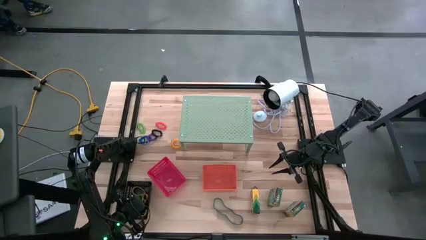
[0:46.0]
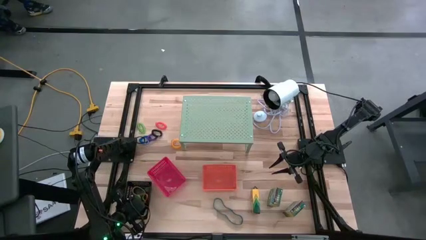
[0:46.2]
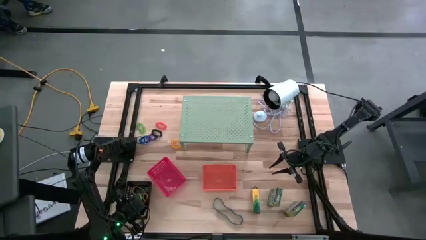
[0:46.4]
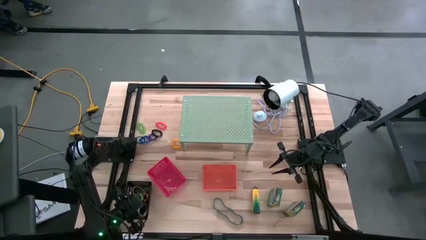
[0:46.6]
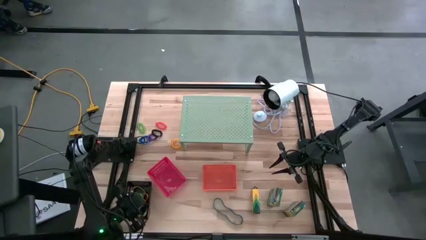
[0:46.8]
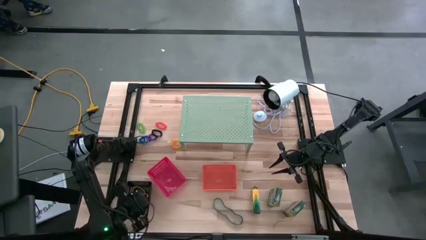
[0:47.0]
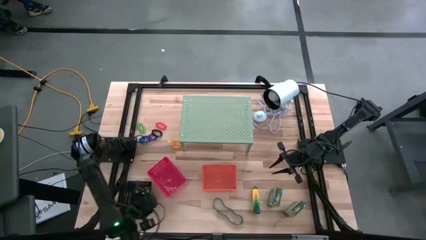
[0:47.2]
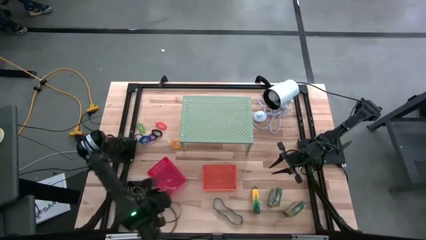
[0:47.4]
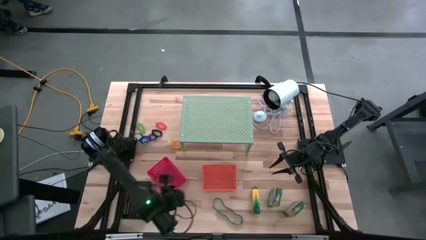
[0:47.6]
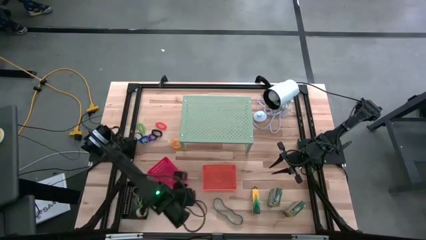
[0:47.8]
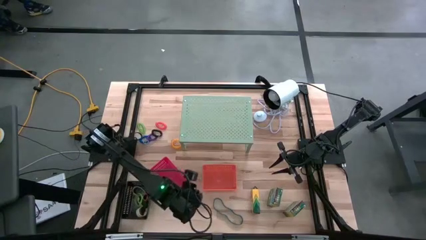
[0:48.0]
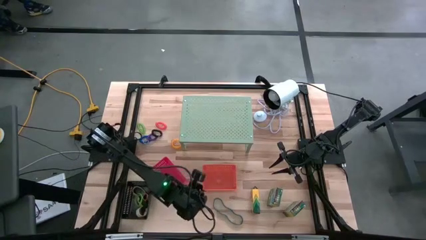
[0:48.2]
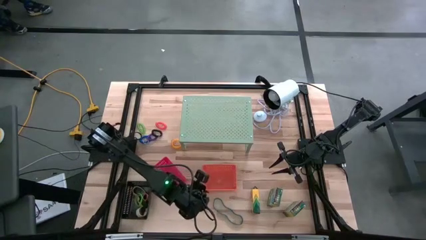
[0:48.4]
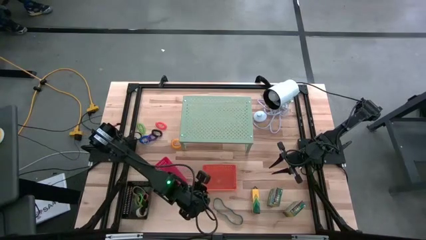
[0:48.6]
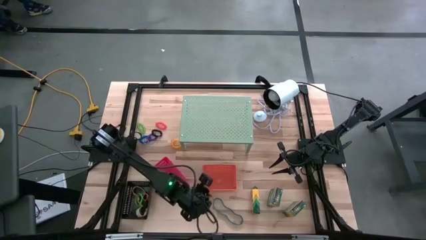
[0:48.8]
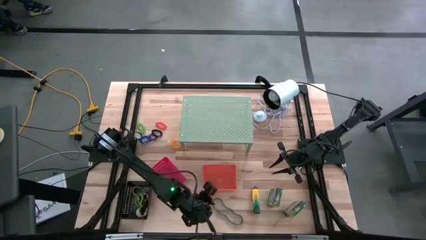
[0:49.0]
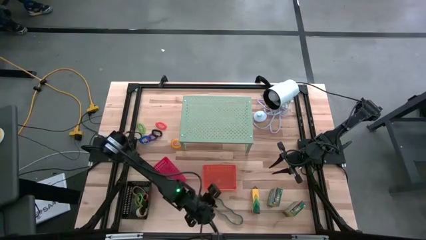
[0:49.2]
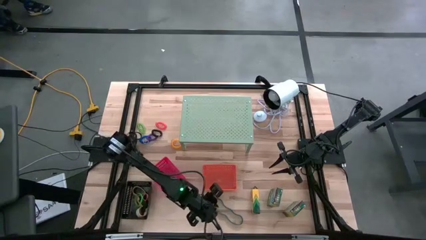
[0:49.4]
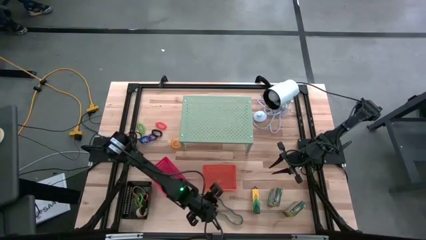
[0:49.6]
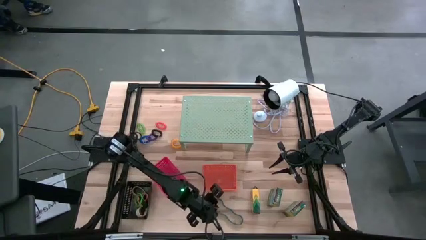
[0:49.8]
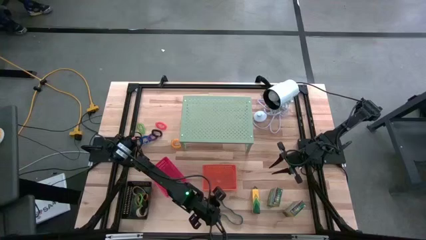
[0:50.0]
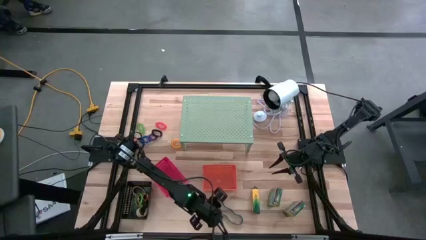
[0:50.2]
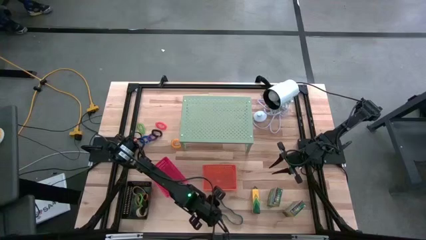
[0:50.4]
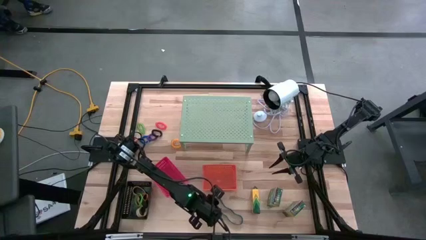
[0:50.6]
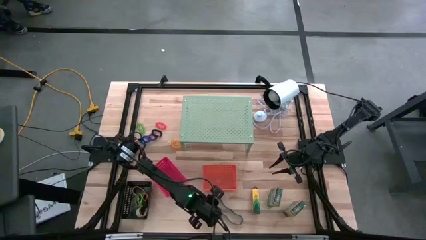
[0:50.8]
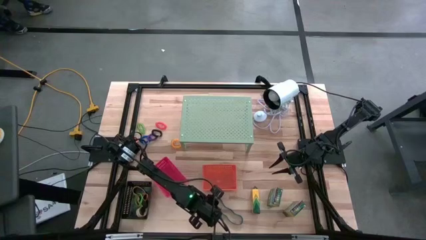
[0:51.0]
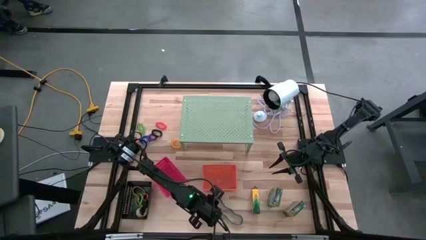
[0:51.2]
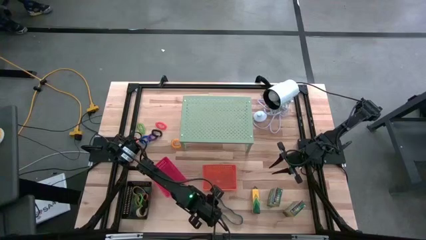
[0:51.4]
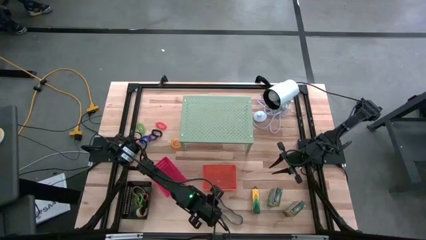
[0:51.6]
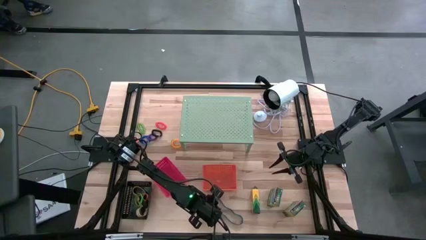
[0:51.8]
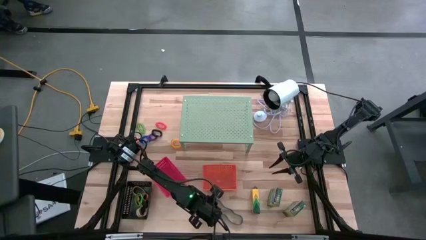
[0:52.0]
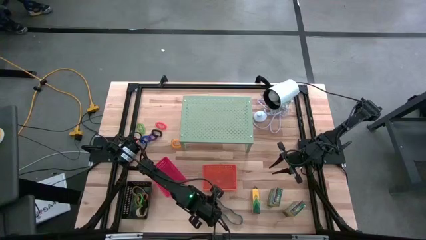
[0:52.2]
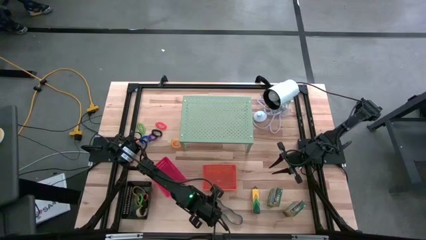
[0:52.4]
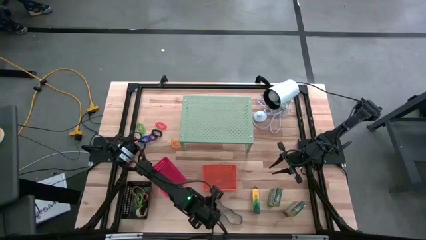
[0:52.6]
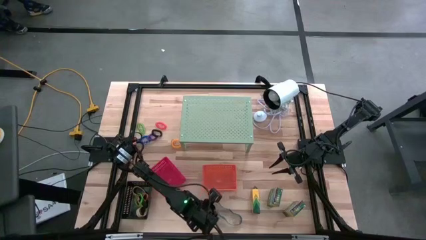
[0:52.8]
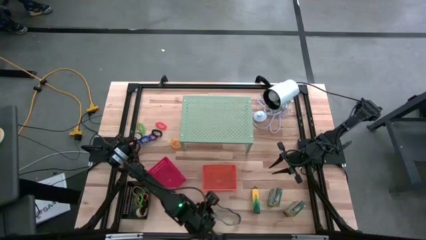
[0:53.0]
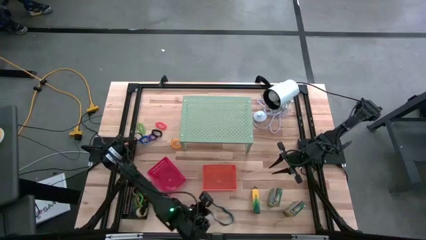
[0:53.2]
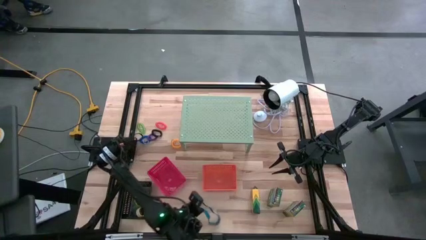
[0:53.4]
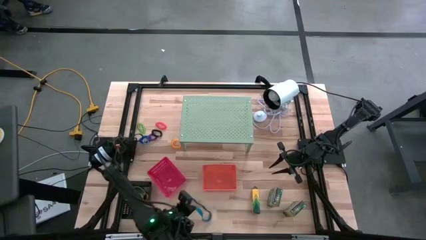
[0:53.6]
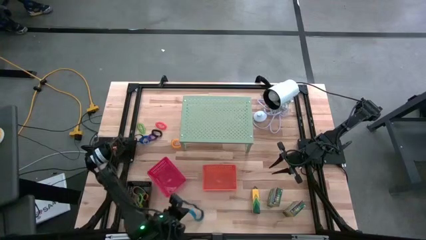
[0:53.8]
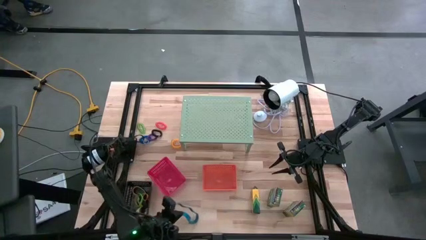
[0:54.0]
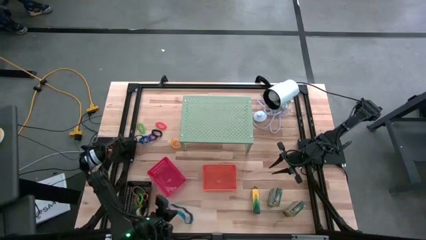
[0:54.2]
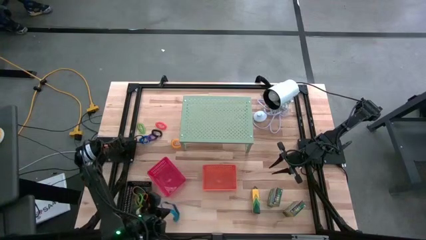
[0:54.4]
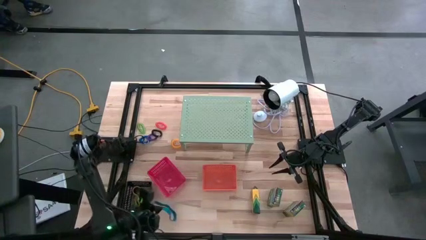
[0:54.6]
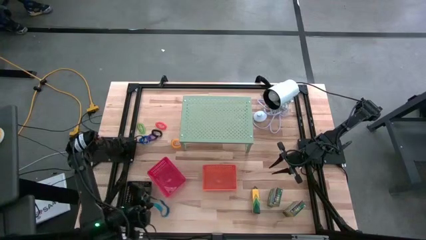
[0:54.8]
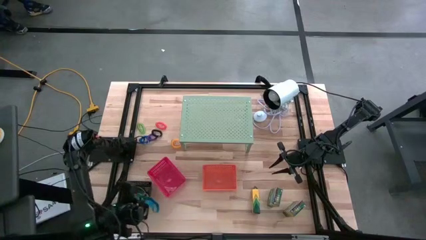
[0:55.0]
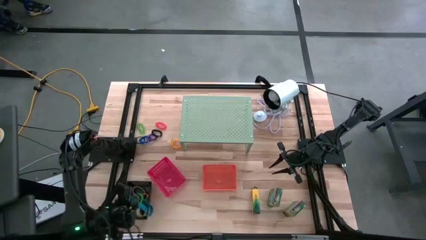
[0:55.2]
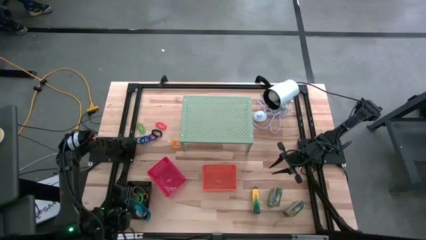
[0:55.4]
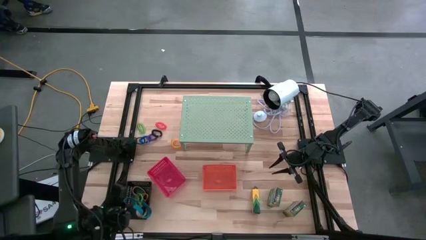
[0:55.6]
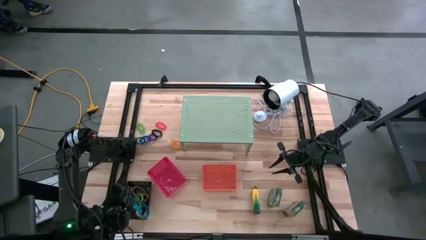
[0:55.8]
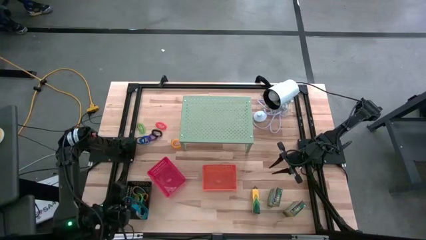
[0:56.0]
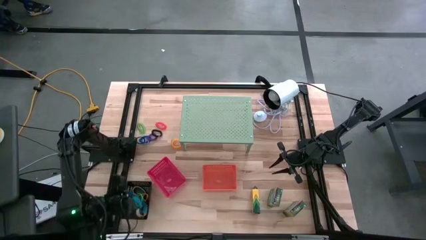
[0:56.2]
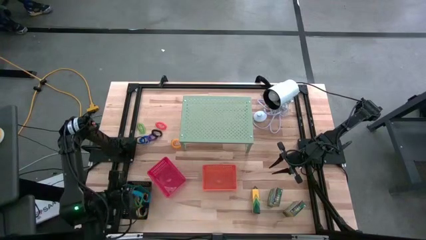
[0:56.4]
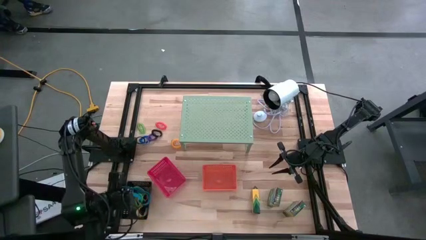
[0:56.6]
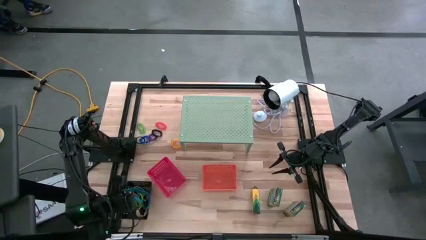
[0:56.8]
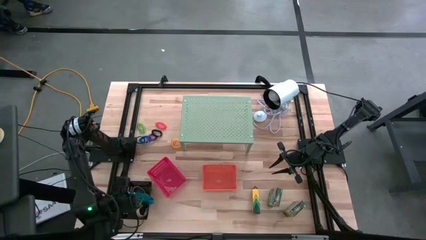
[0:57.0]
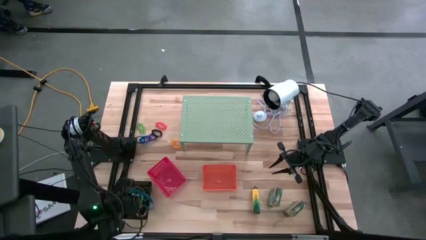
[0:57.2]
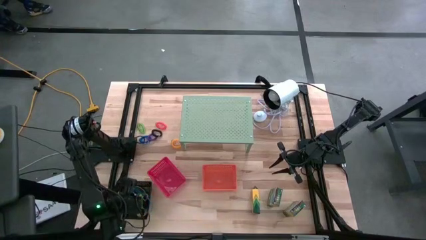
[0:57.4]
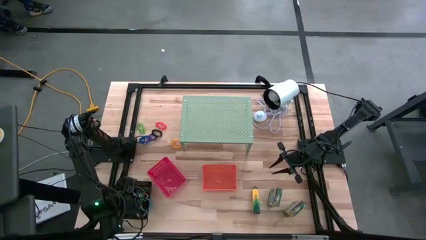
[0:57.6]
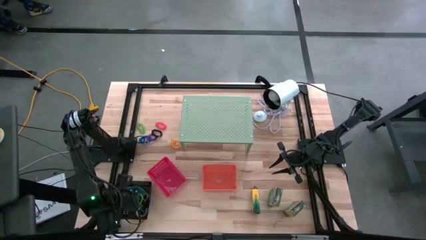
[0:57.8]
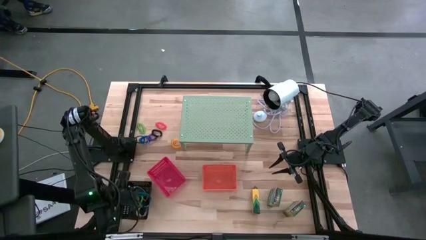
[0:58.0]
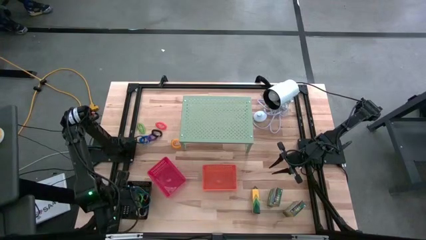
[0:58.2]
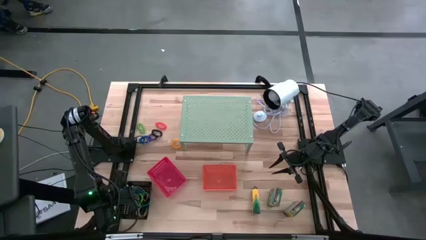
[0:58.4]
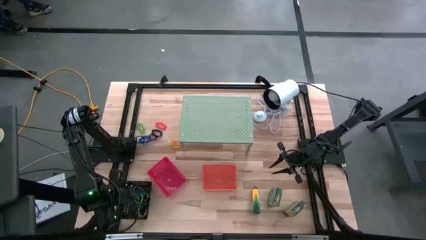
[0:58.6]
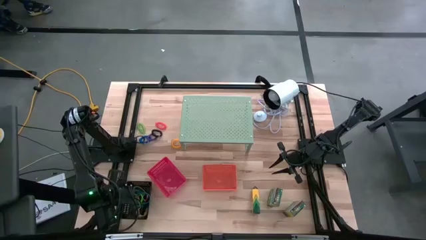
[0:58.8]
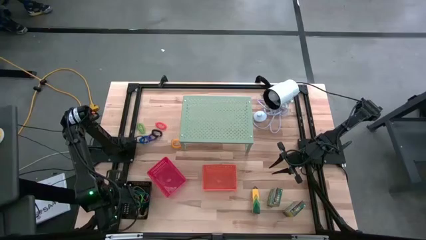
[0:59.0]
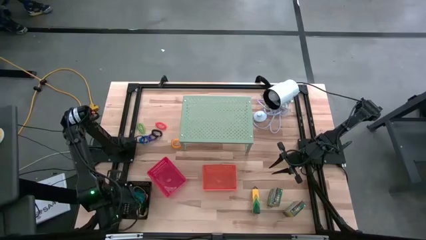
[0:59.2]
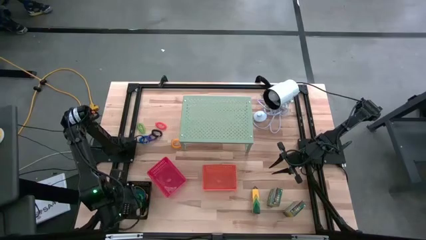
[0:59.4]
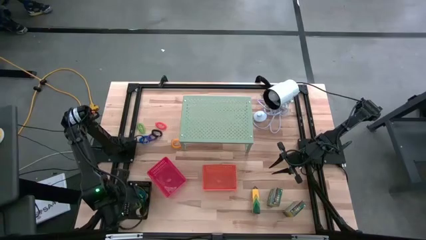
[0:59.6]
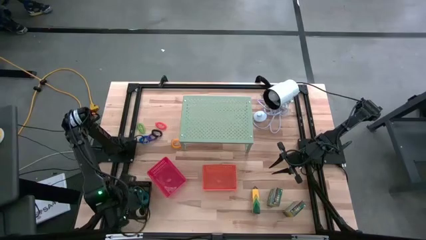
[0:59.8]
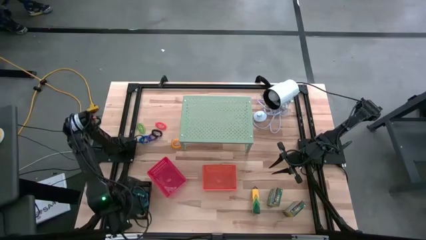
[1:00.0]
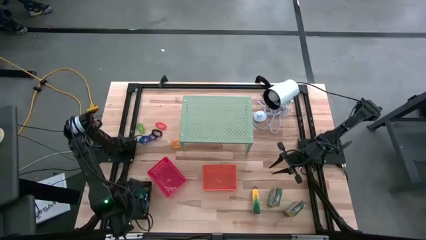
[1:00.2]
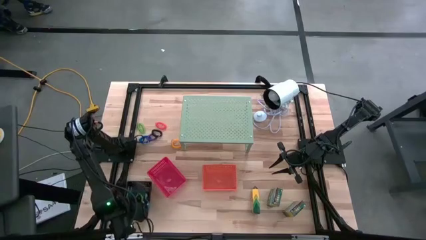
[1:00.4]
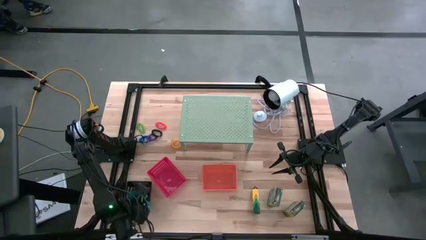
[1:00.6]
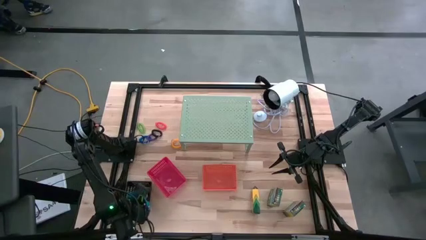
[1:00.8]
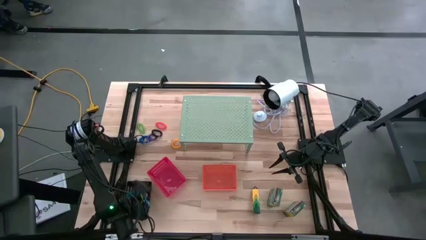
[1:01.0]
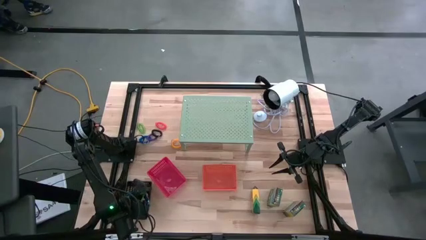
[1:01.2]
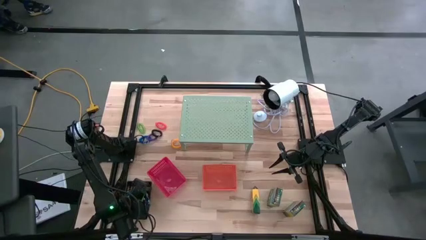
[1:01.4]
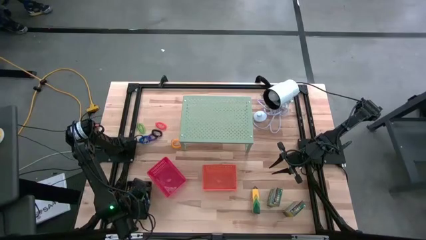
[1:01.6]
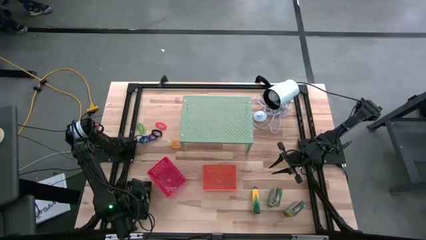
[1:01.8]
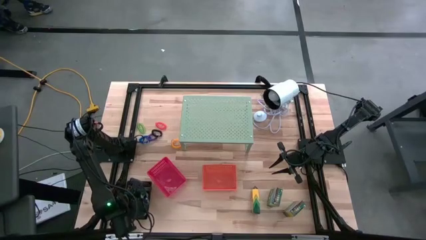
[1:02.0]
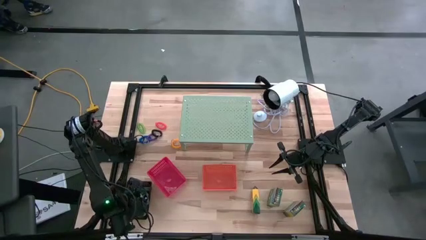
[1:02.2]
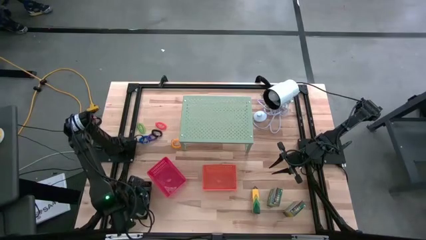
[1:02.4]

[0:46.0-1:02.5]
Task: Pick & Place Office Desk Supplies
Put the blue rubber band into the black bin
